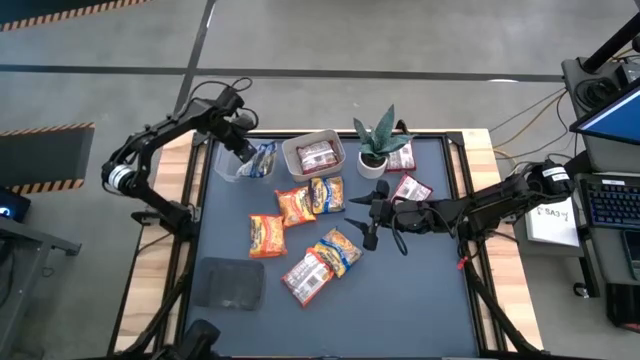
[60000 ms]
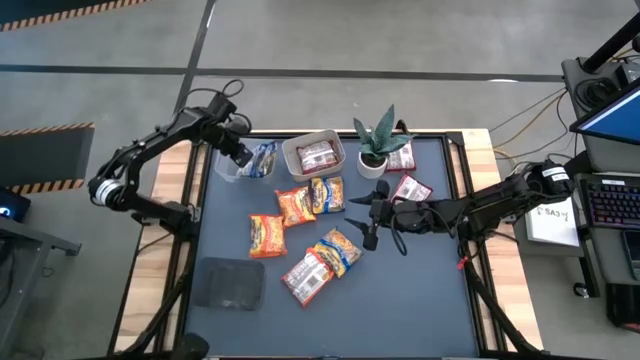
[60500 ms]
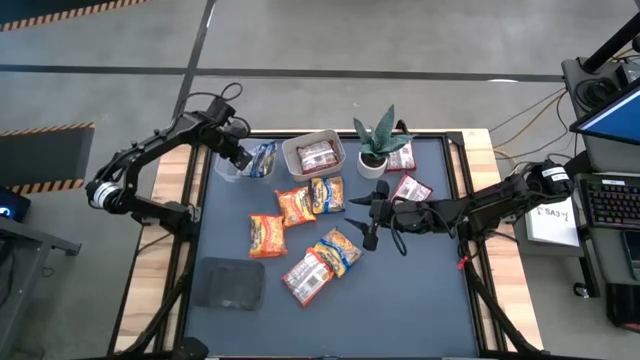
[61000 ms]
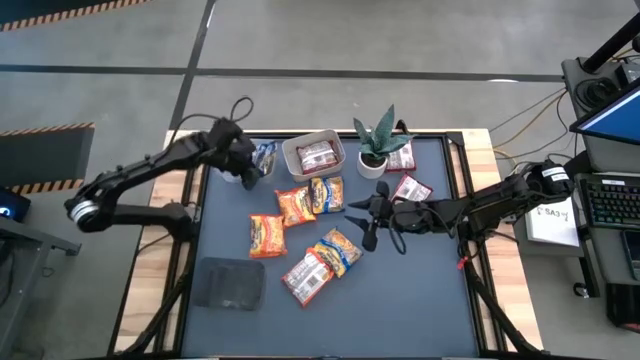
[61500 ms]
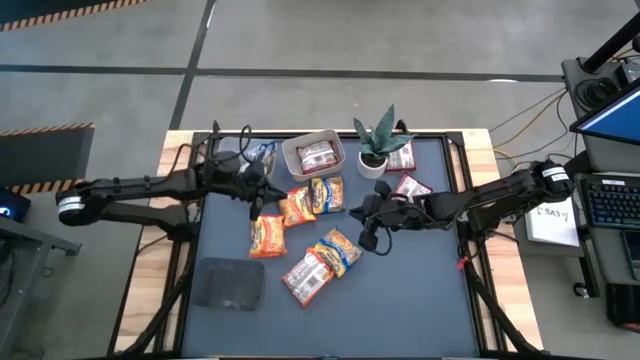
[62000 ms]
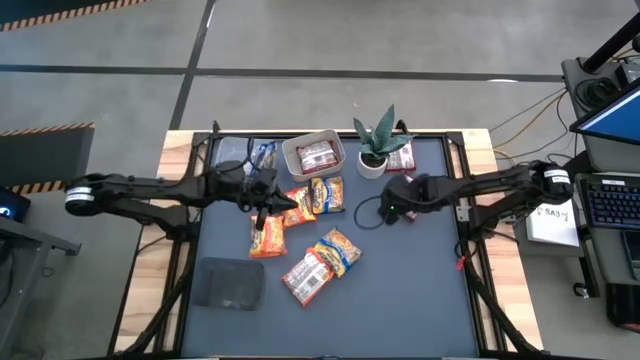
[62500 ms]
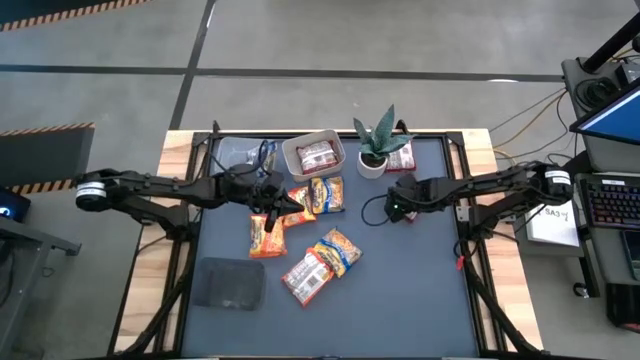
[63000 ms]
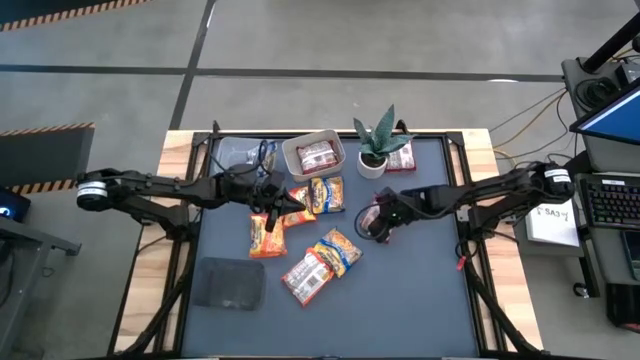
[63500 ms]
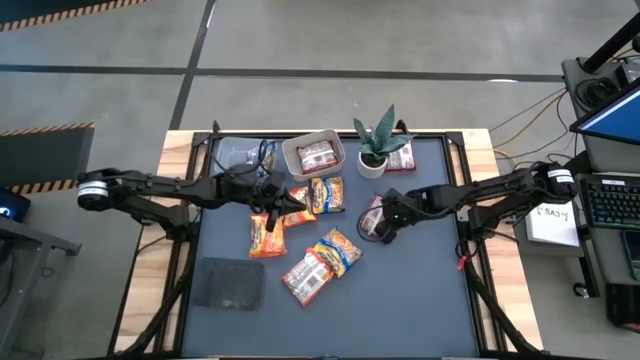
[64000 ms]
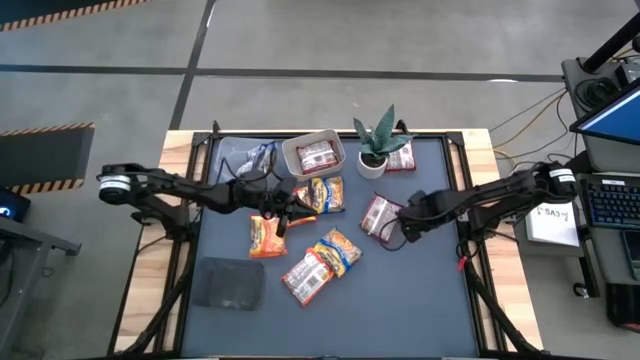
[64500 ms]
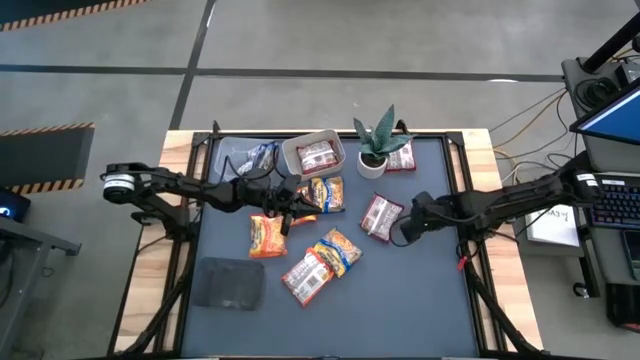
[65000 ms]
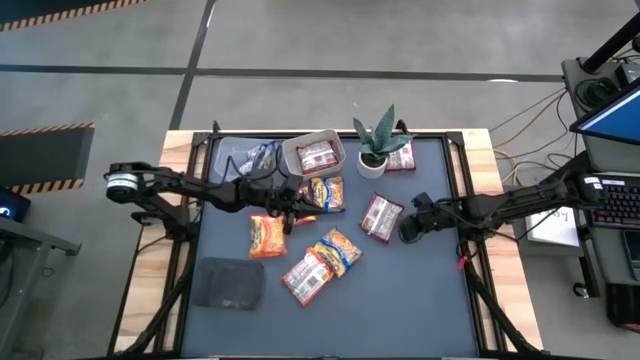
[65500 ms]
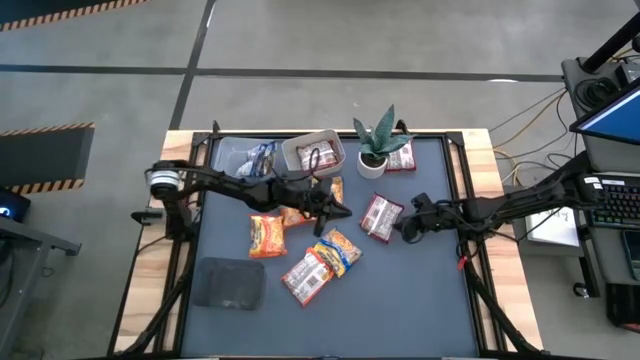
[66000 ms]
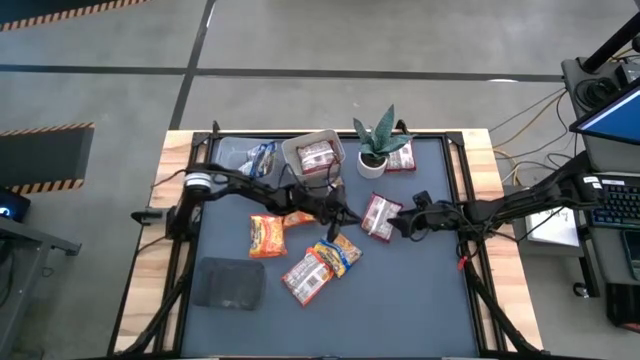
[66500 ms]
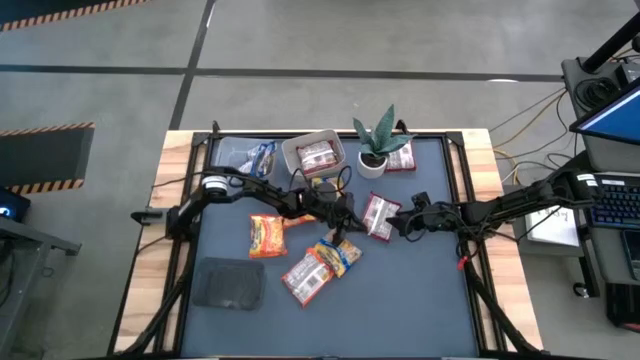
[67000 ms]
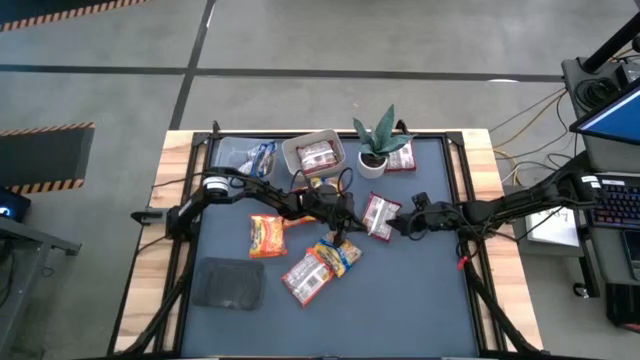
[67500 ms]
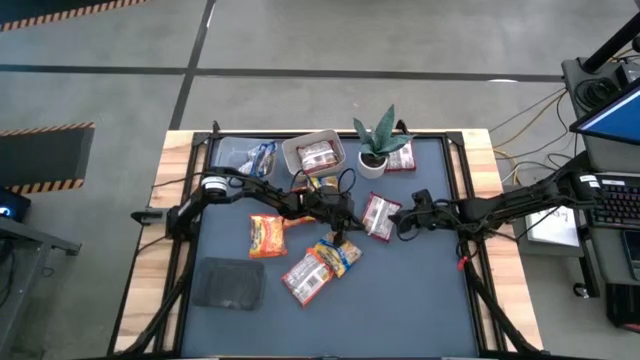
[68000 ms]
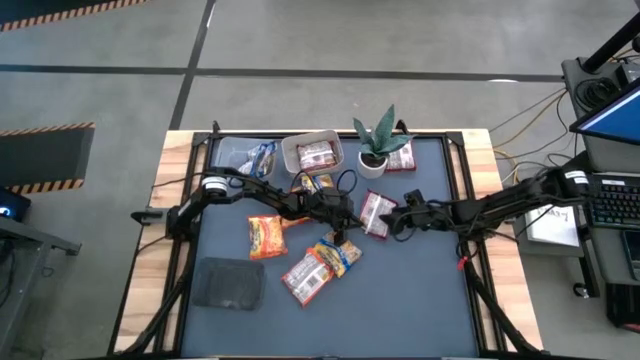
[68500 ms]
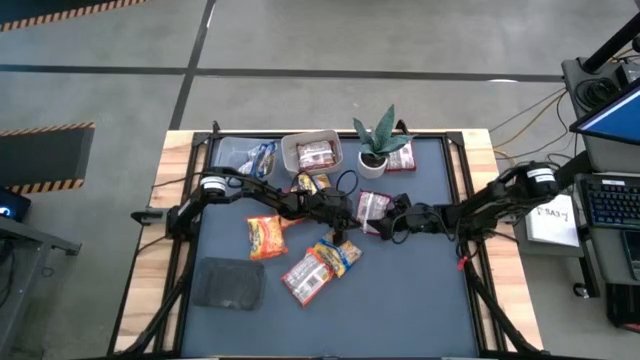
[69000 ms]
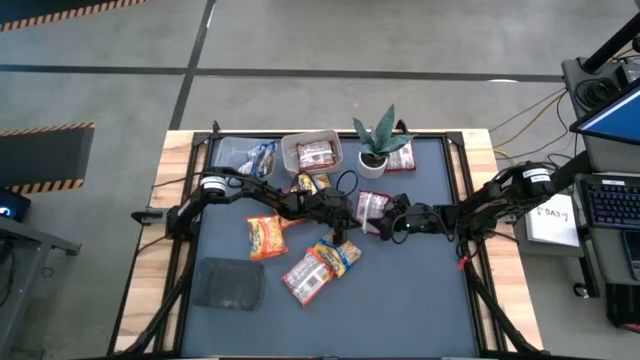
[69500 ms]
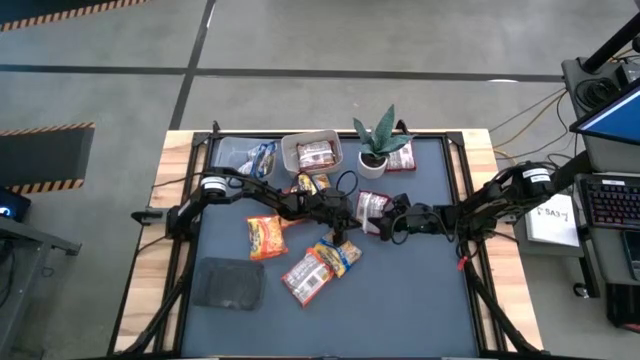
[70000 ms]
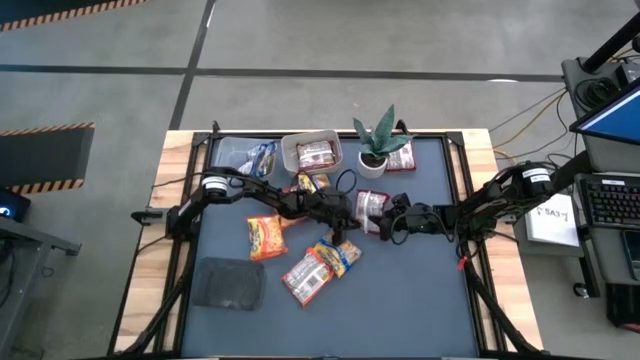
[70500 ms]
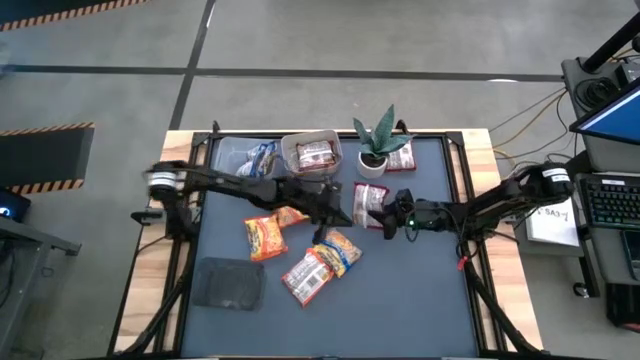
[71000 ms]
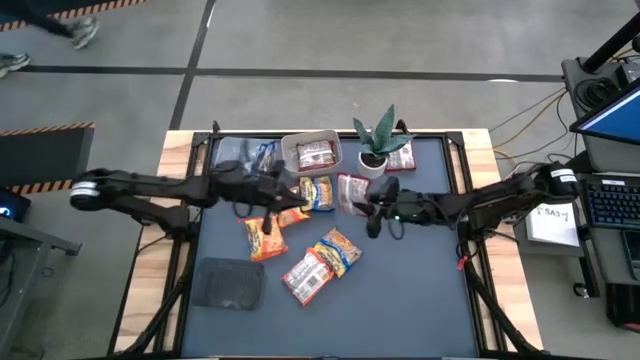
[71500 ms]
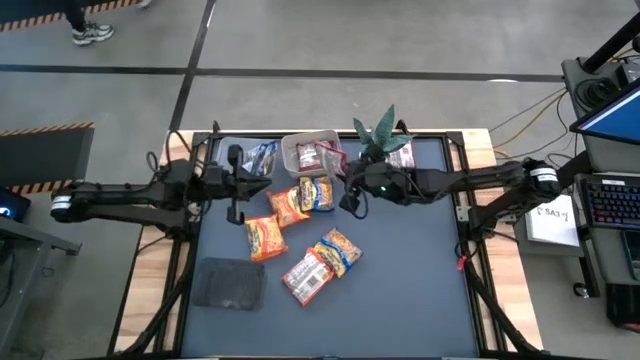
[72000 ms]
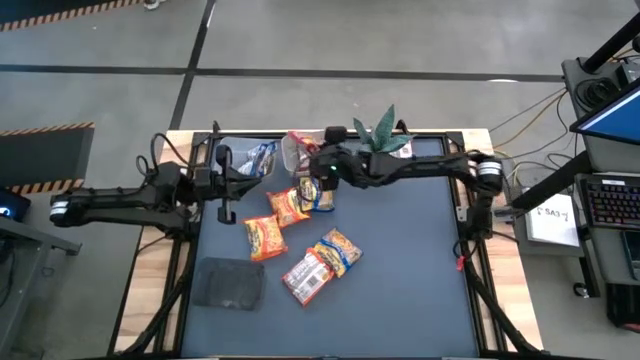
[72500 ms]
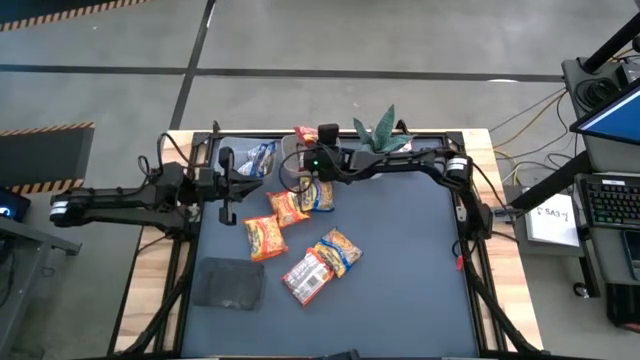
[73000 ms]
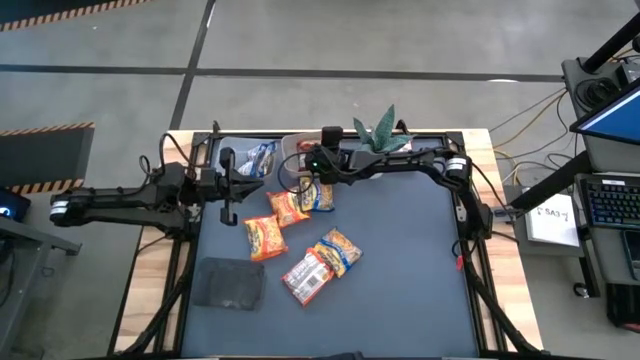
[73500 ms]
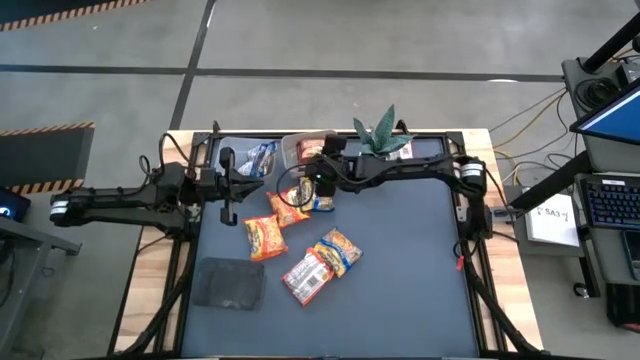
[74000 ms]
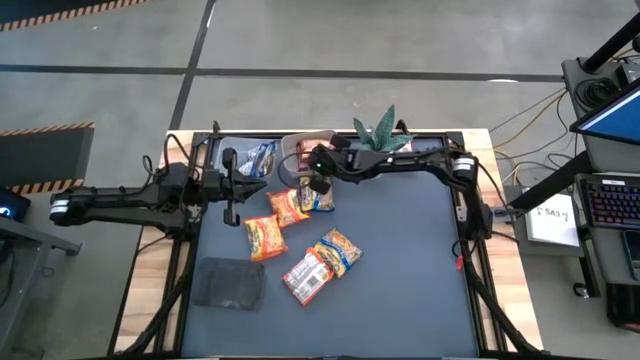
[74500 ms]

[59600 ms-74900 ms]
Task: Sort Maruchan noodles
Put the red noodle pack into the gray bin

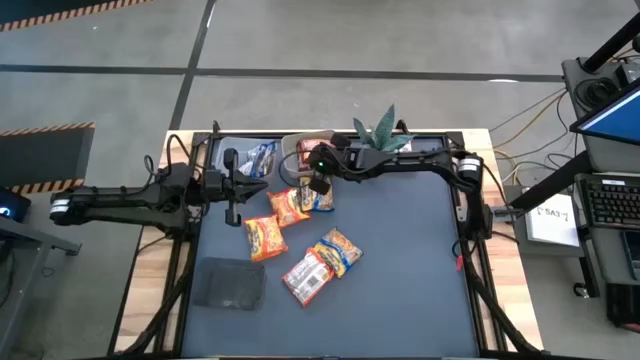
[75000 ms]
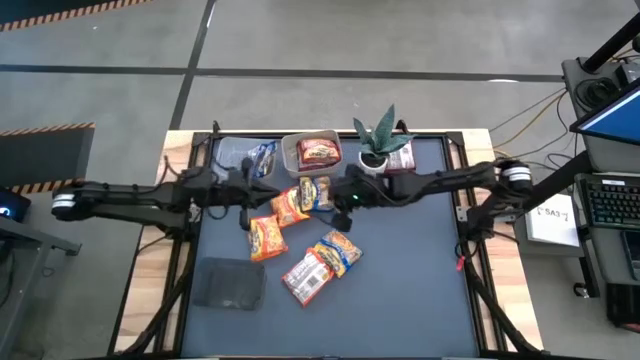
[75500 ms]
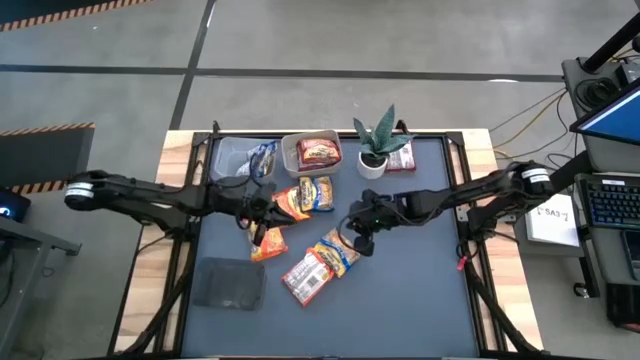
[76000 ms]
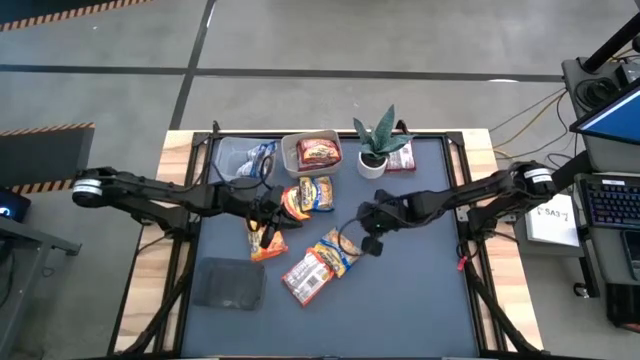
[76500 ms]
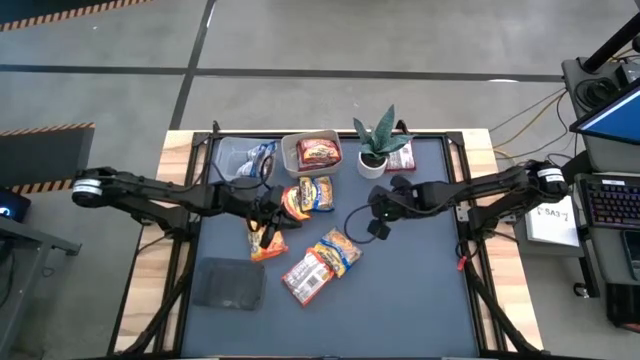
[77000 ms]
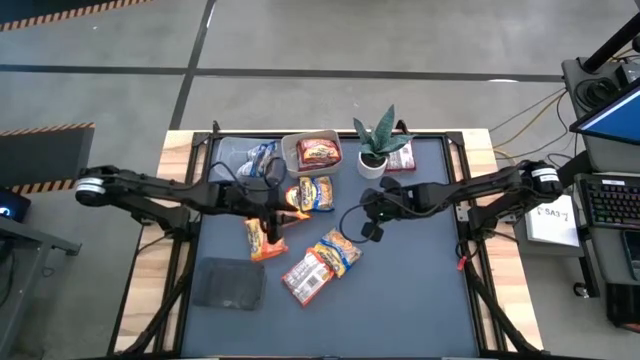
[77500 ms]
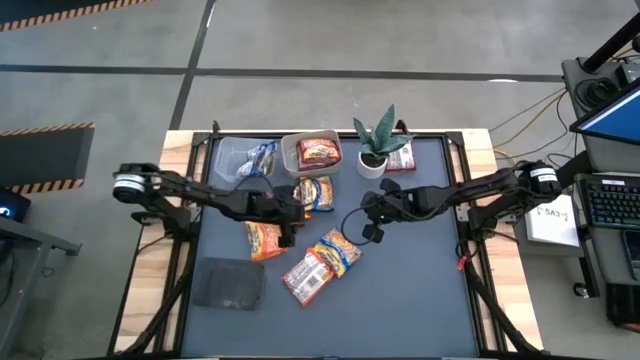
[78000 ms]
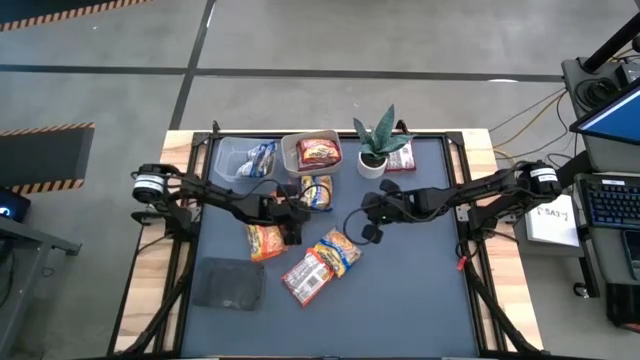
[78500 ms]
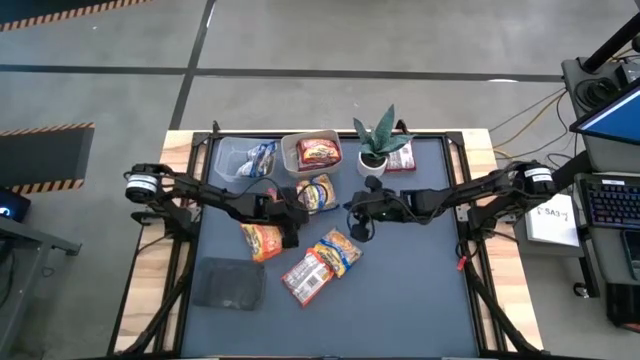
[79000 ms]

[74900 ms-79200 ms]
Put the orange noodle pack into the black bin

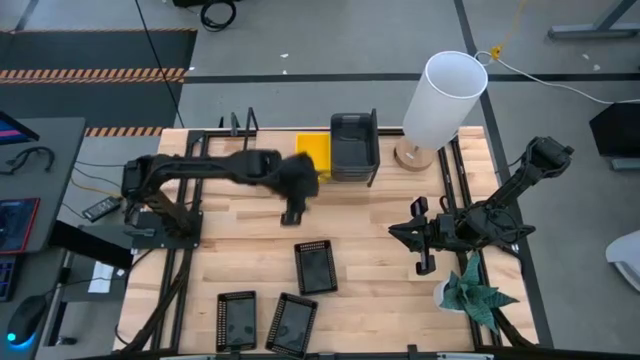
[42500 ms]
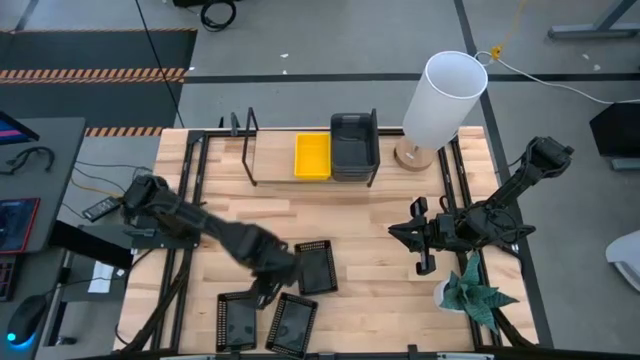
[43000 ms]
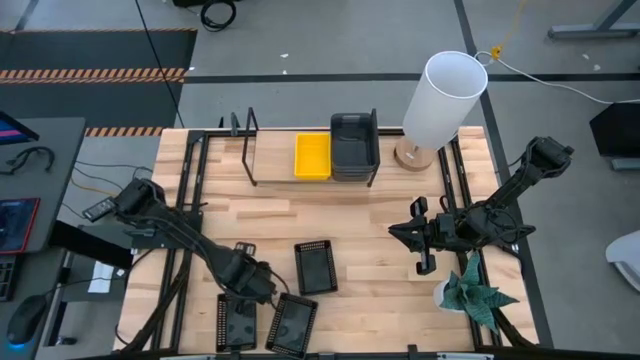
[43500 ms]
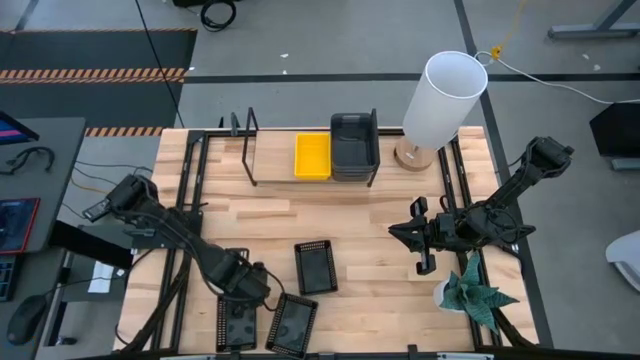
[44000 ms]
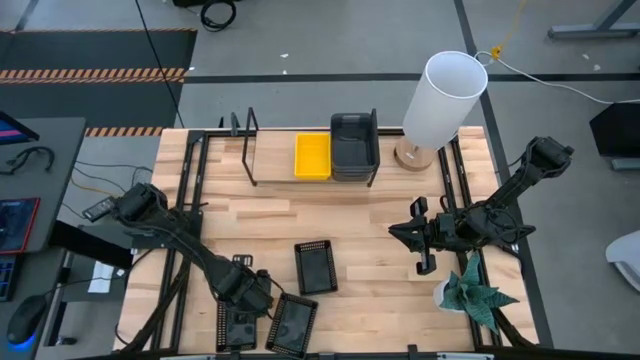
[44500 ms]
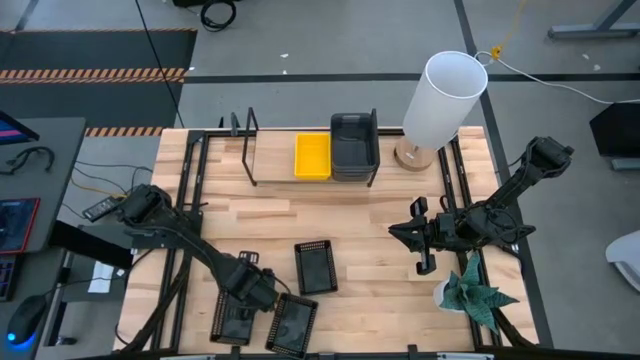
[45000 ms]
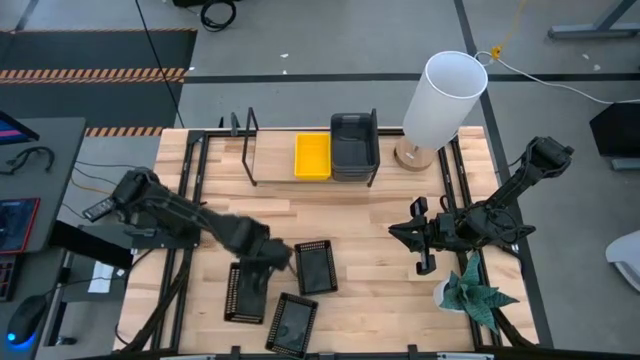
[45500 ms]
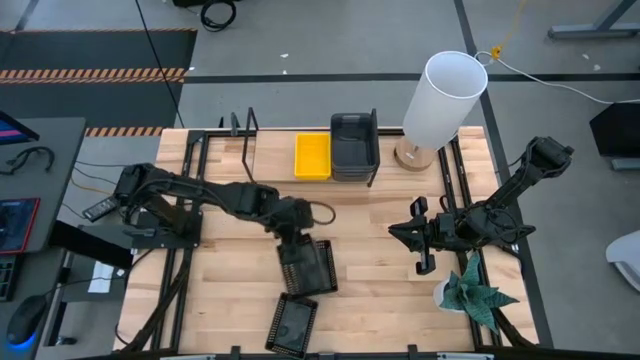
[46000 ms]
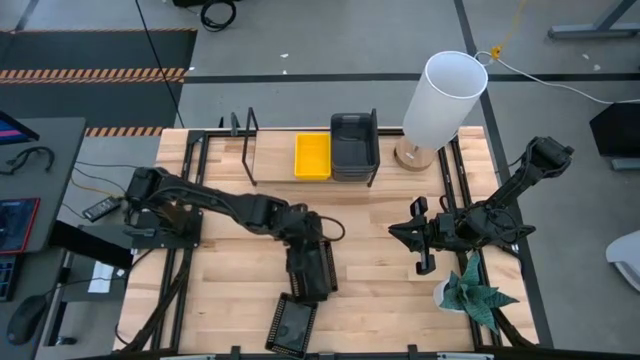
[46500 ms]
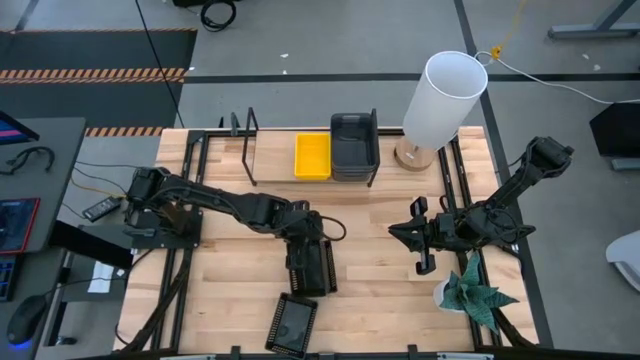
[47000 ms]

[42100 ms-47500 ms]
Task: Stack baskets on shelf by color
Stack the bottom left black bin into the top right black bin
